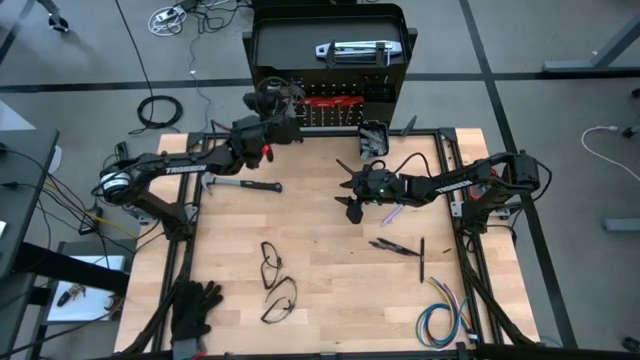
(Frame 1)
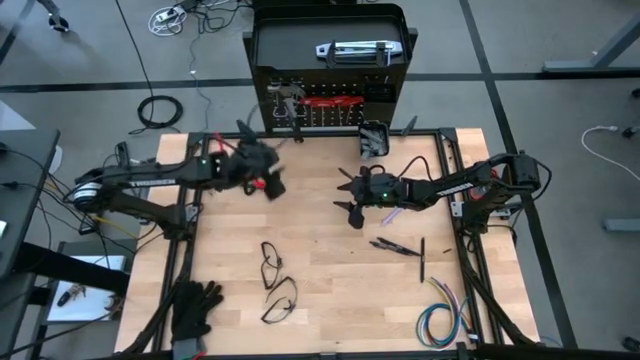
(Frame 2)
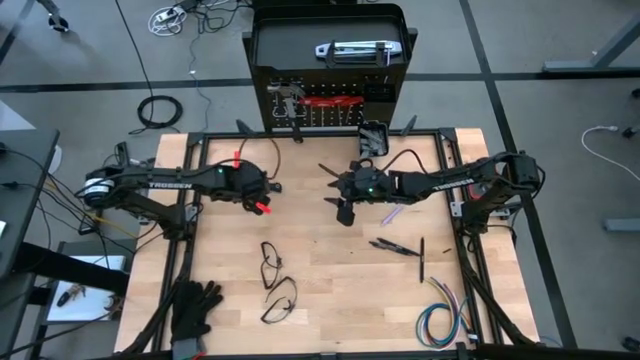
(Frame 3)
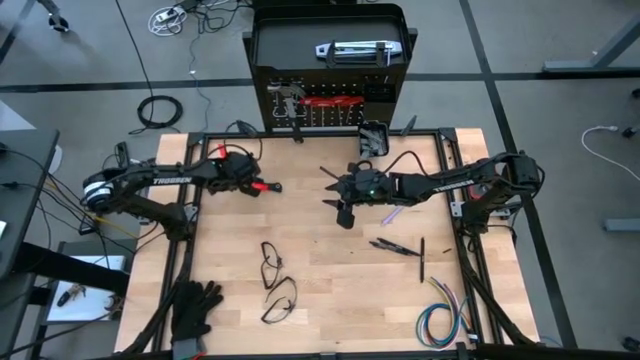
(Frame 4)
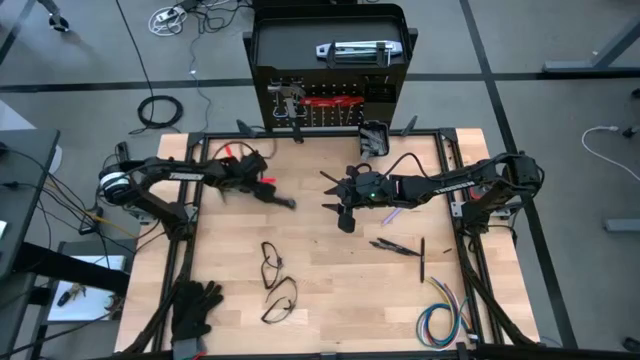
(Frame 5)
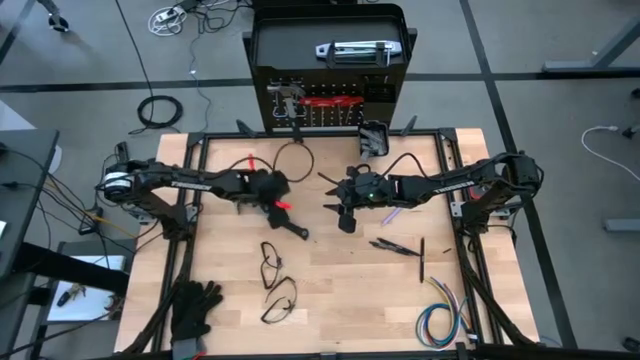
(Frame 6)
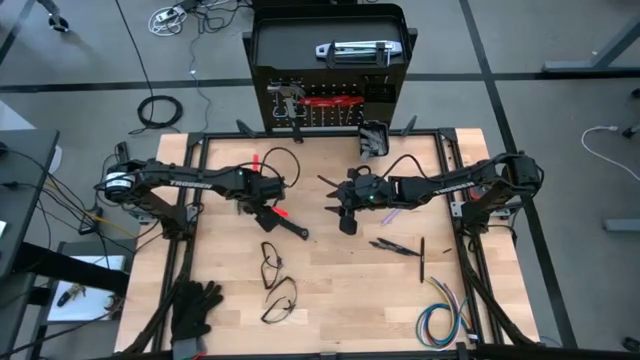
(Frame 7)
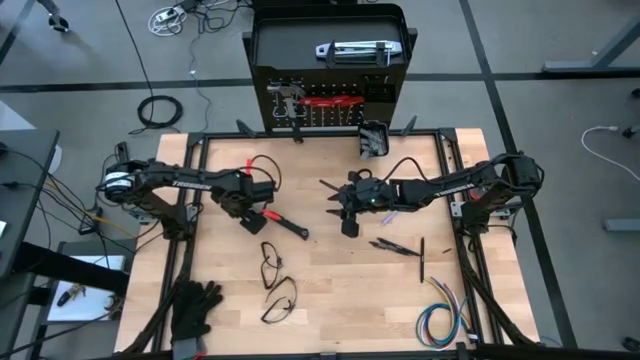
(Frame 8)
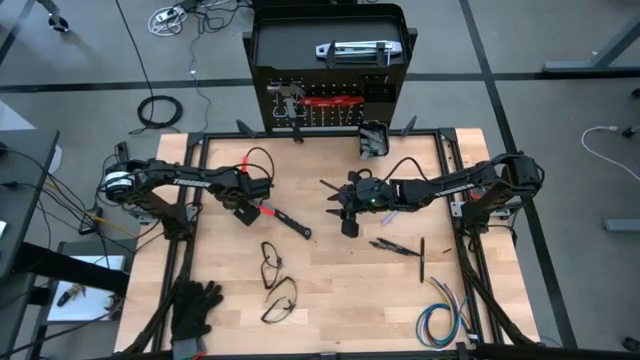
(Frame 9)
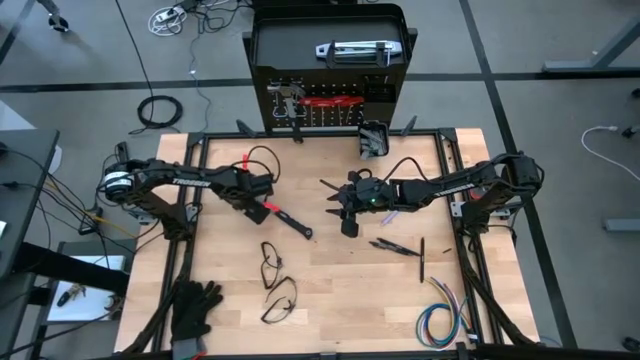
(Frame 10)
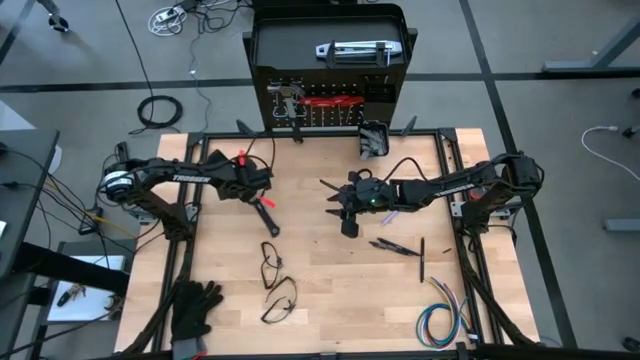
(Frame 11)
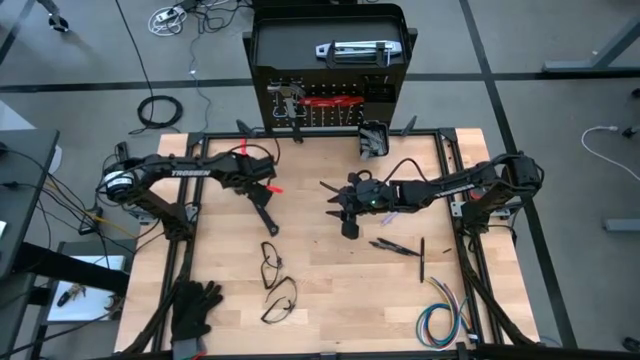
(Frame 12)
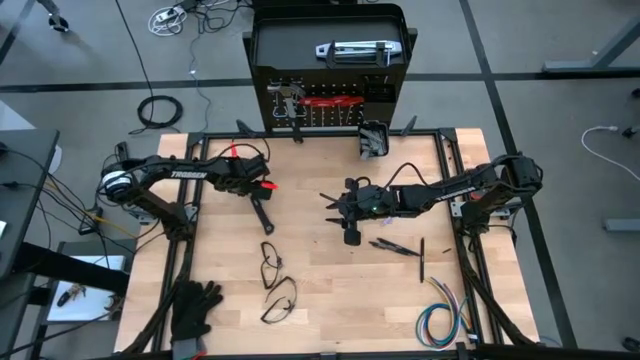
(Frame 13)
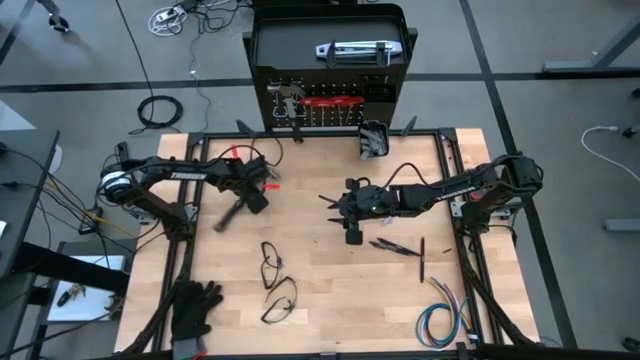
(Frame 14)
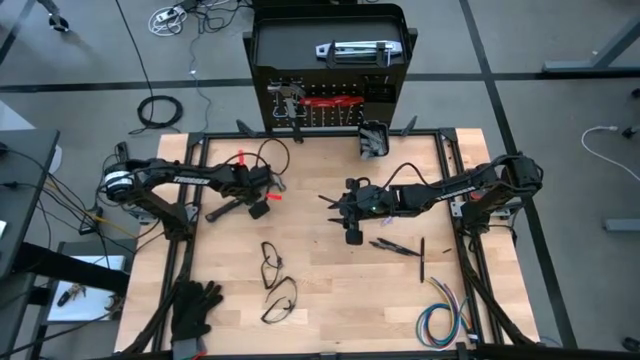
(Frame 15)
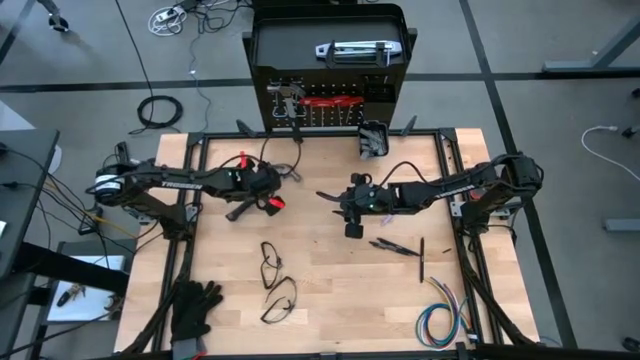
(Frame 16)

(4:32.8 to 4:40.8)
Task: Hang tools onto peg board
Hang the hammer on the pegboard

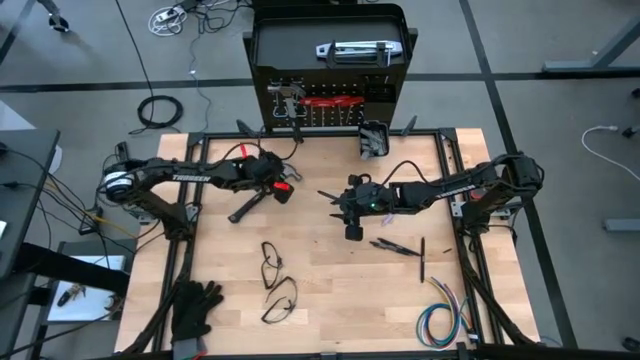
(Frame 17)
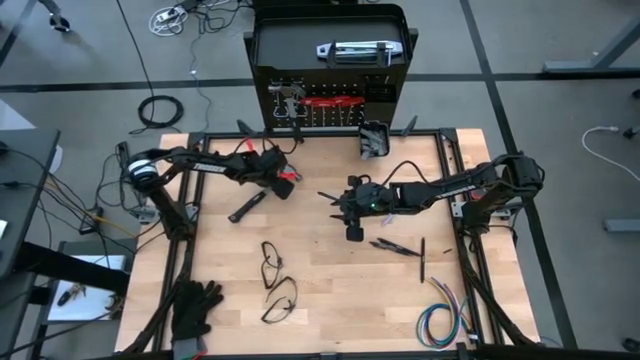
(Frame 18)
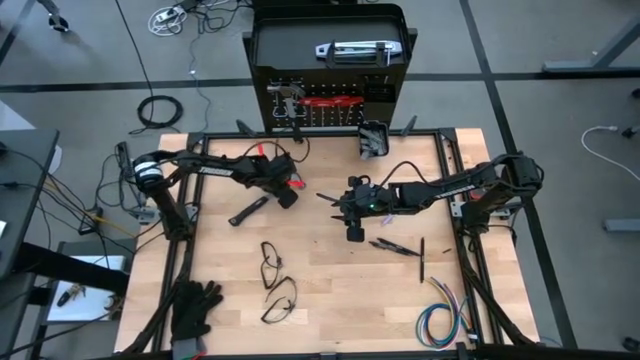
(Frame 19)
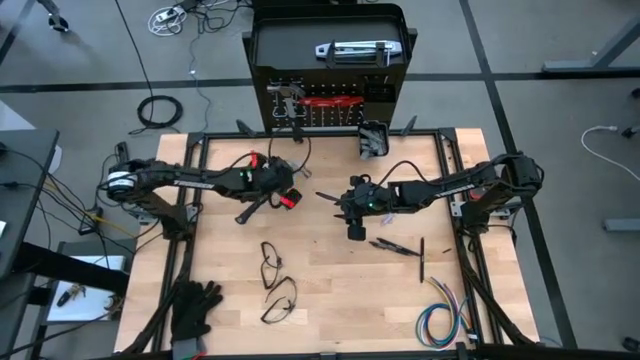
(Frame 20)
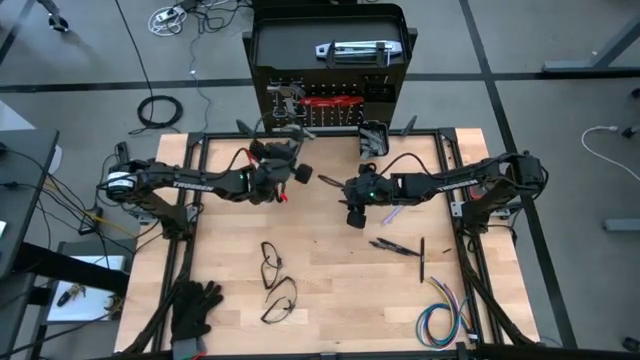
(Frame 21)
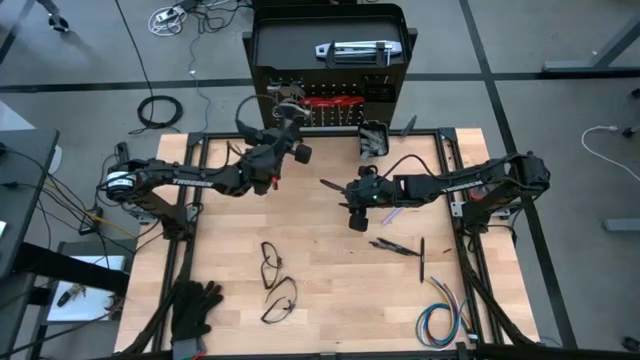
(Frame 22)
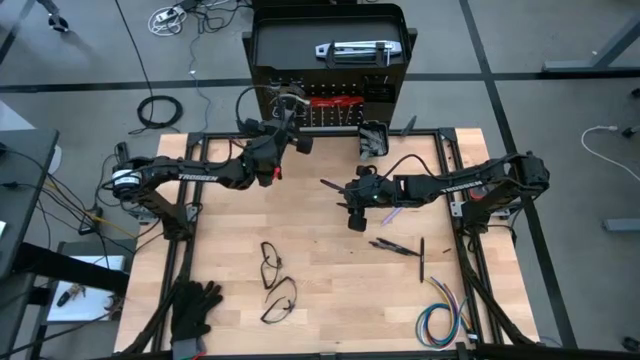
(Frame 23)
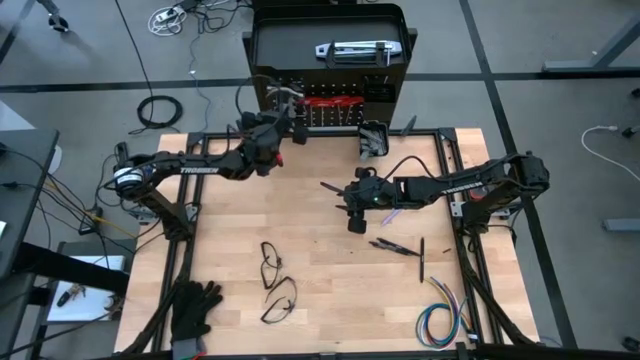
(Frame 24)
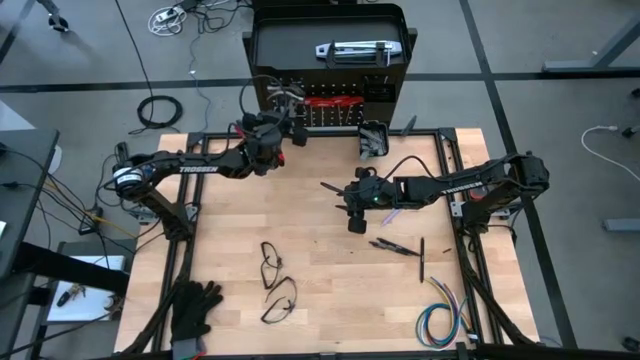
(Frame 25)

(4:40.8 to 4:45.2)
Hang the right hammer on the pegboard

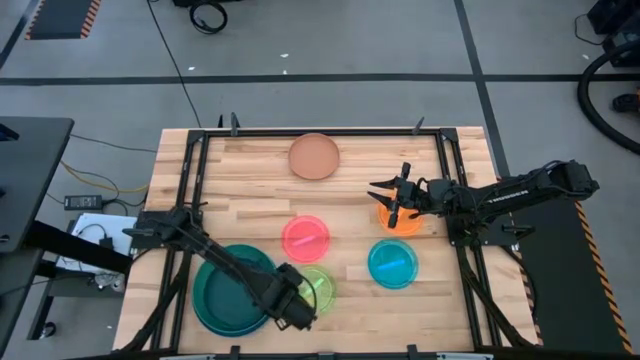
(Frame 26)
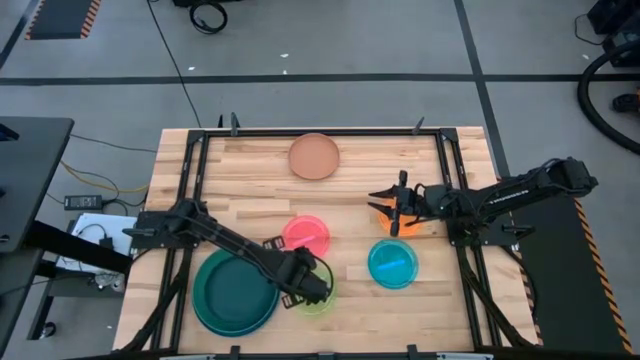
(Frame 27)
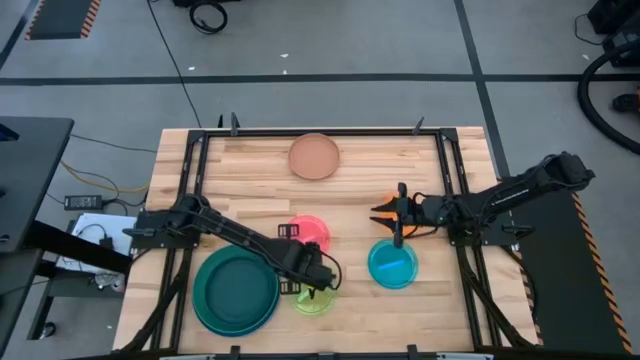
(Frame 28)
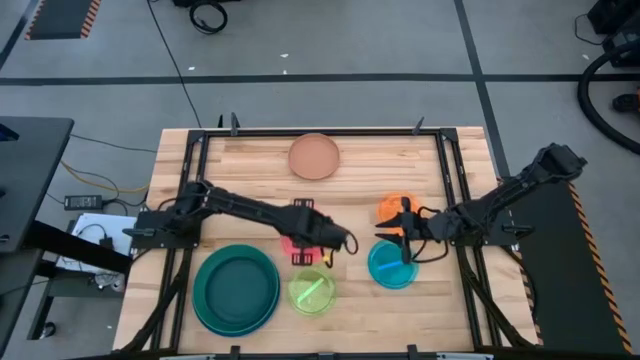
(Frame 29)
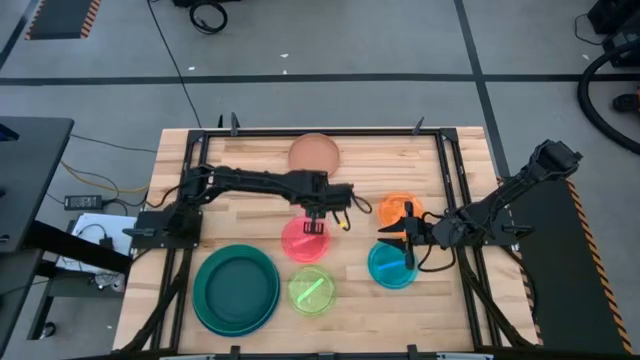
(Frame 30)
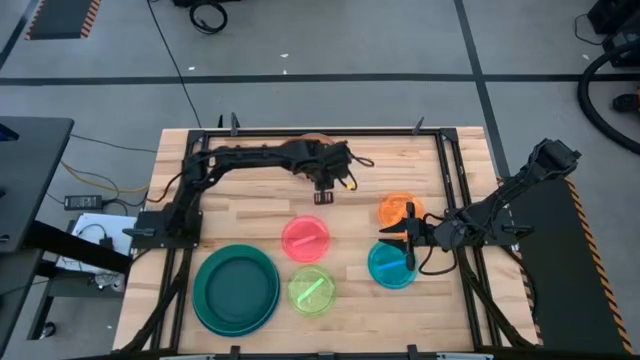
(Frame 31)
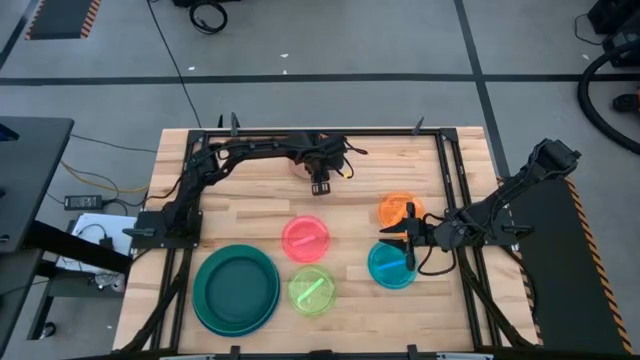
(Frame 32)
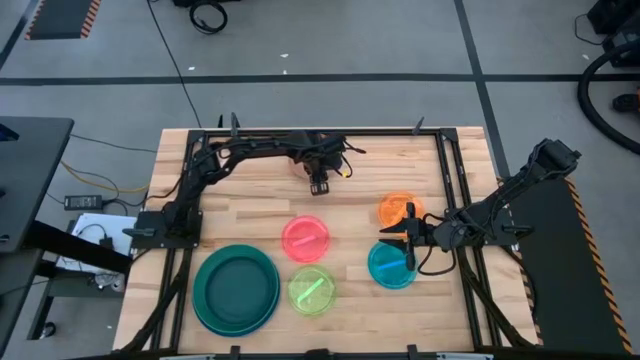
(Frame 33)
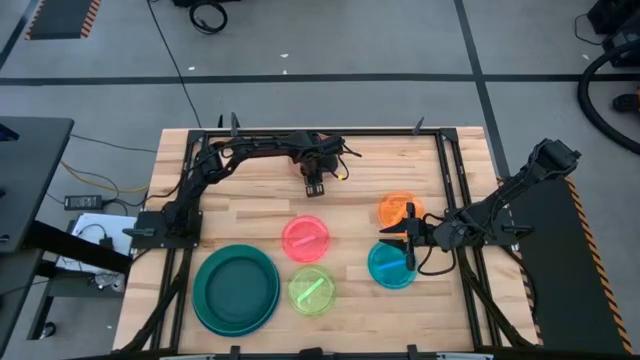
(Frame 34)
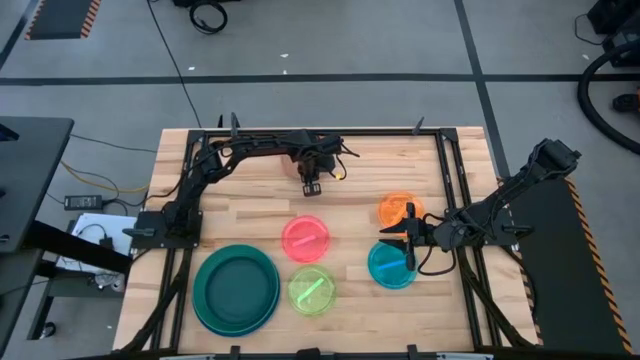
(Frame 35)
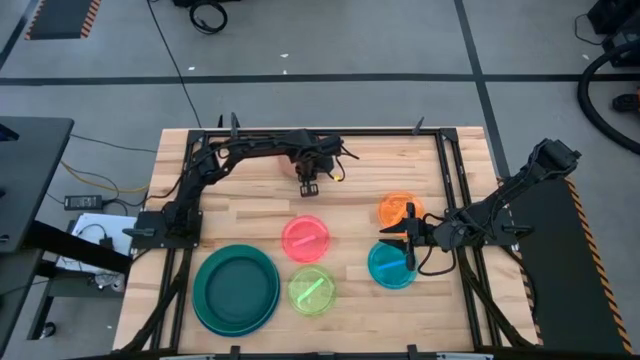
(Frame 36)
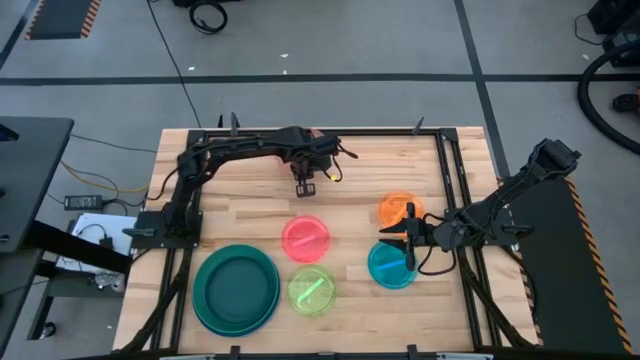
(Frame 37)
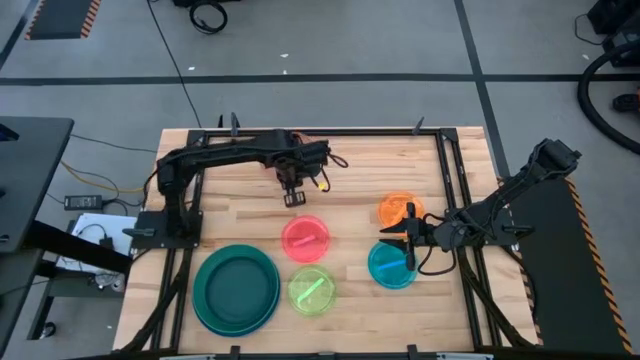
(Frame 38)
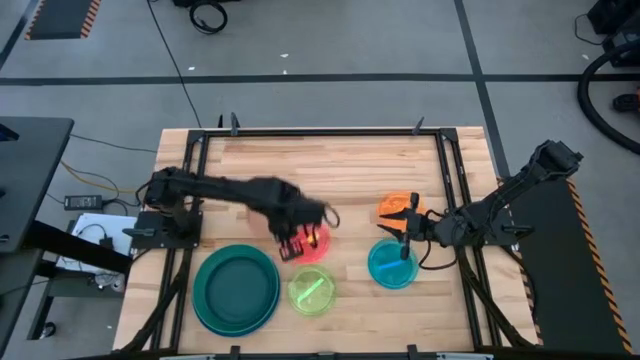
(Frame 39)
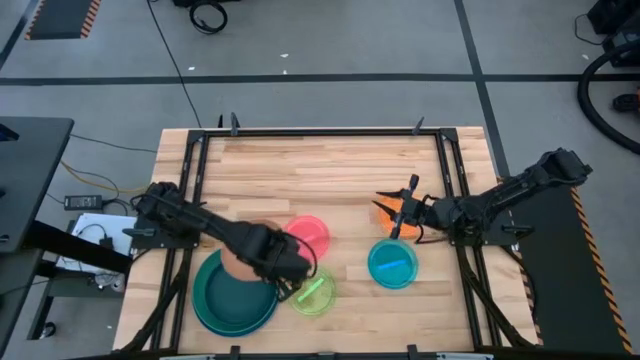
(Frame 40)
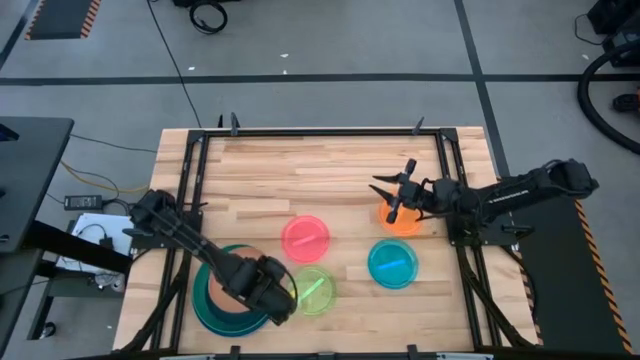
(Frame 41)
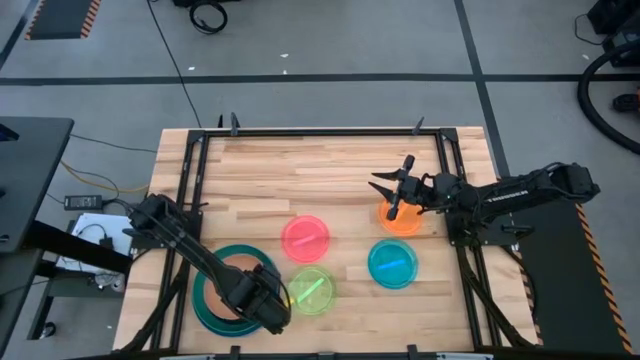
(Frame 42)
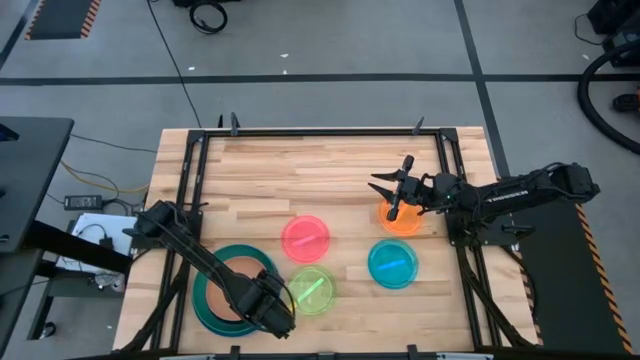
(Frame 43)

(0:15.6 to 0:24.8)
Task: Stack plastic plates
Stack the brown plate on top of the dark blue plate
